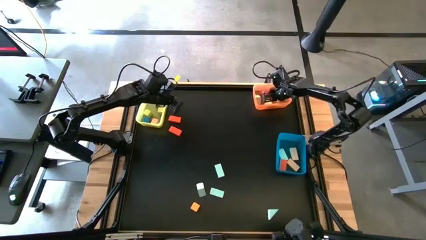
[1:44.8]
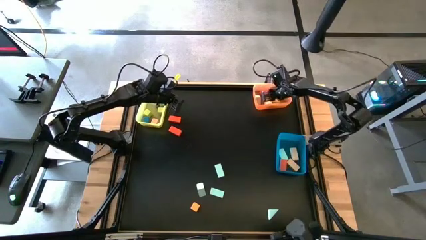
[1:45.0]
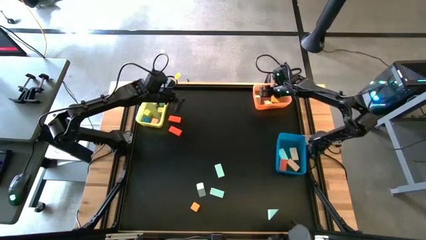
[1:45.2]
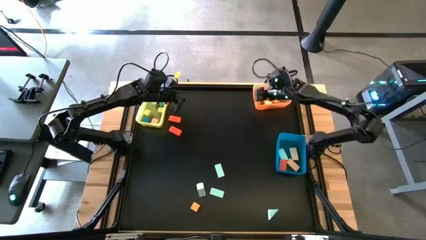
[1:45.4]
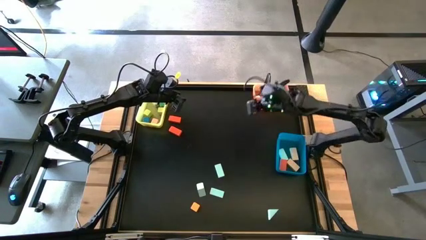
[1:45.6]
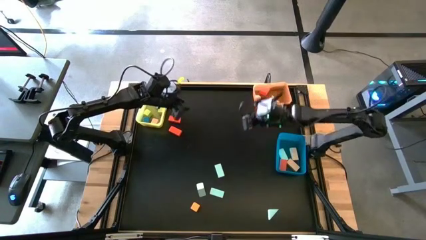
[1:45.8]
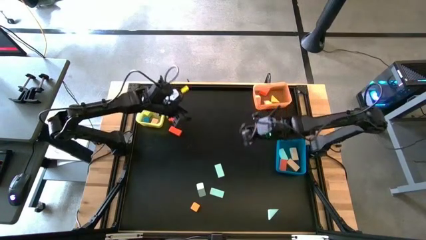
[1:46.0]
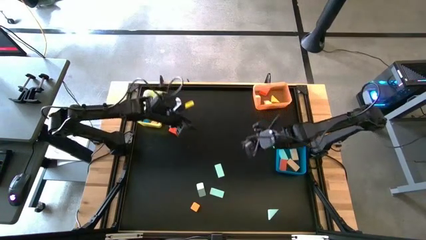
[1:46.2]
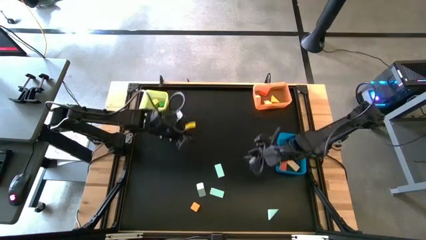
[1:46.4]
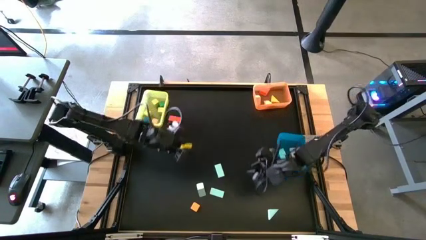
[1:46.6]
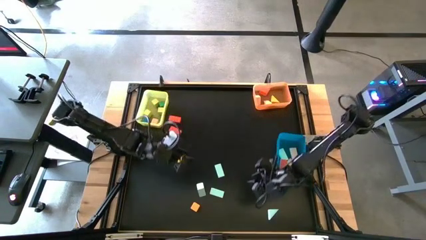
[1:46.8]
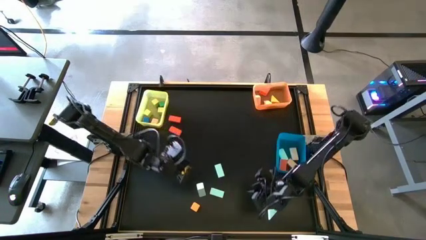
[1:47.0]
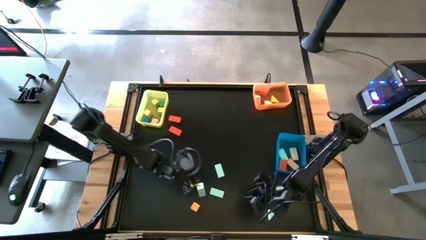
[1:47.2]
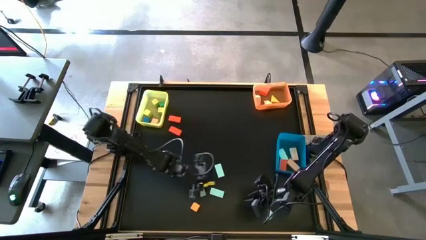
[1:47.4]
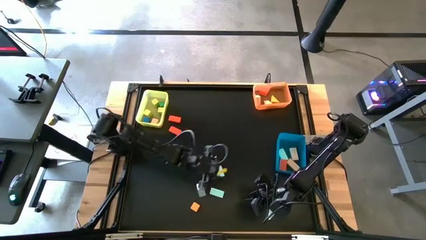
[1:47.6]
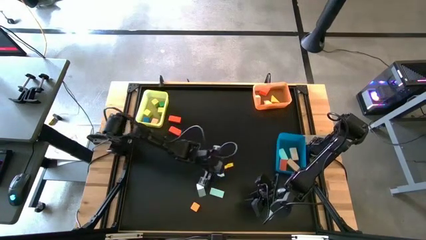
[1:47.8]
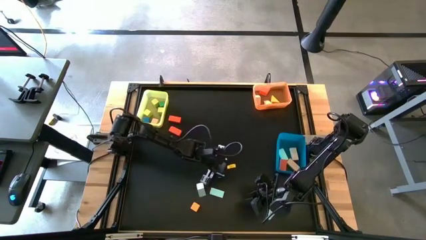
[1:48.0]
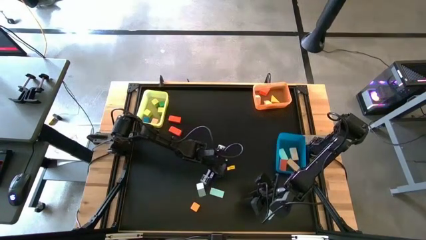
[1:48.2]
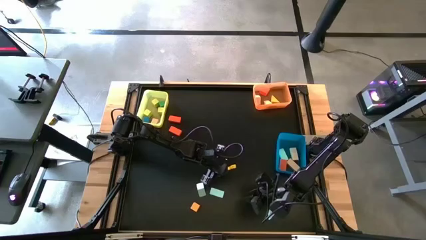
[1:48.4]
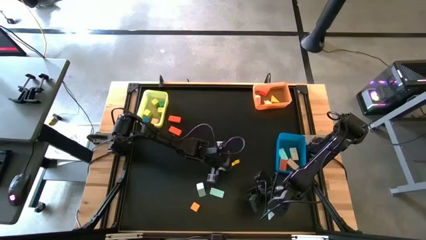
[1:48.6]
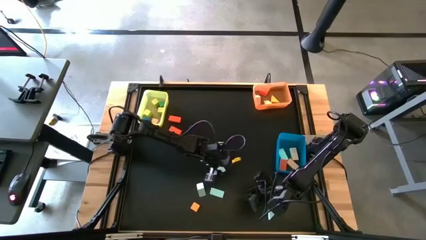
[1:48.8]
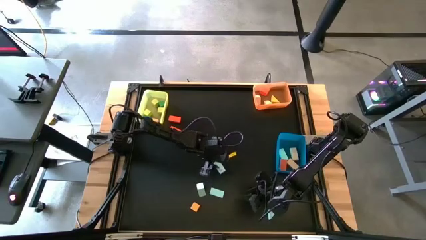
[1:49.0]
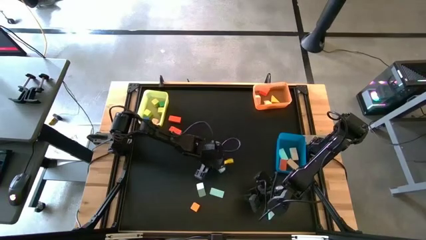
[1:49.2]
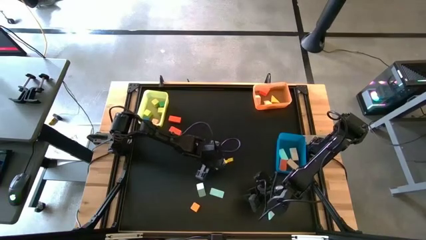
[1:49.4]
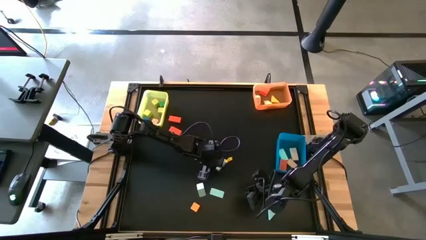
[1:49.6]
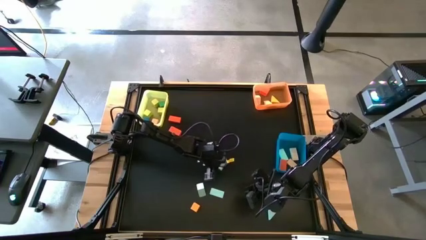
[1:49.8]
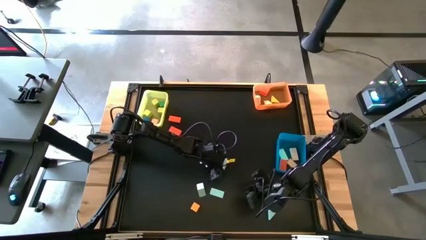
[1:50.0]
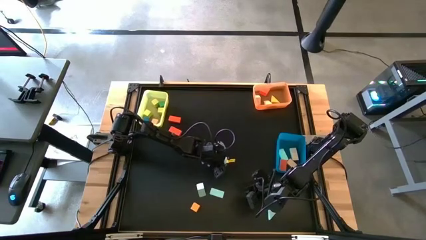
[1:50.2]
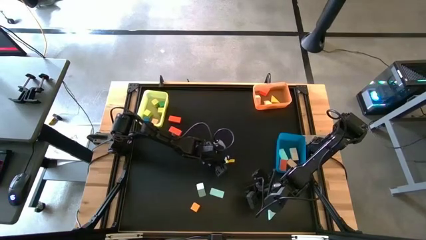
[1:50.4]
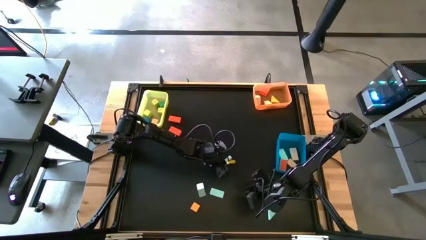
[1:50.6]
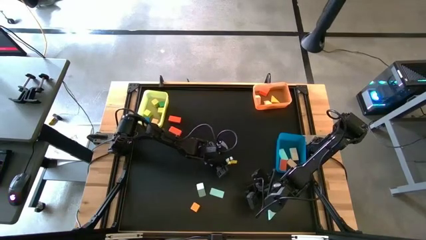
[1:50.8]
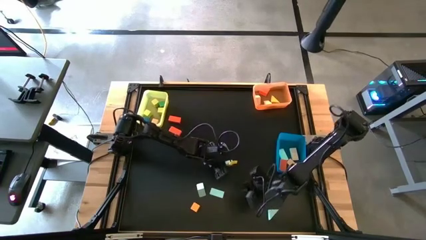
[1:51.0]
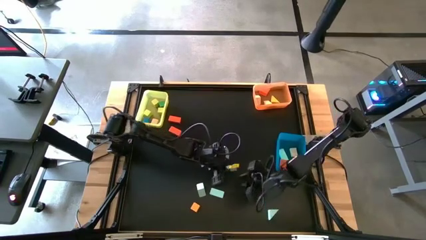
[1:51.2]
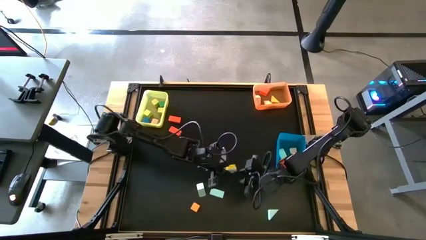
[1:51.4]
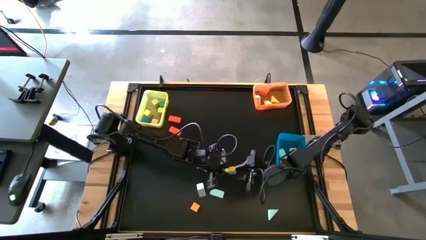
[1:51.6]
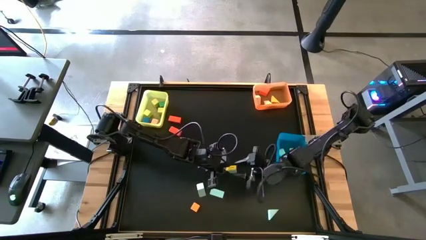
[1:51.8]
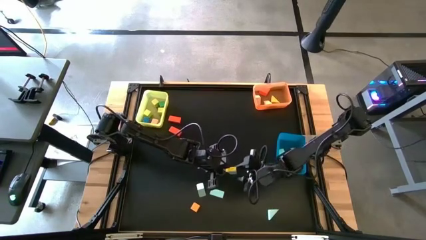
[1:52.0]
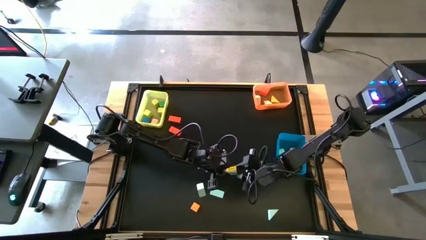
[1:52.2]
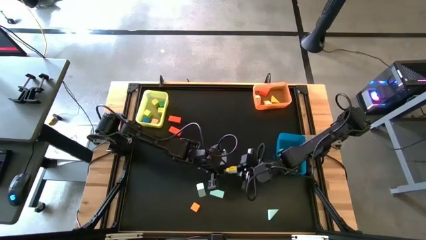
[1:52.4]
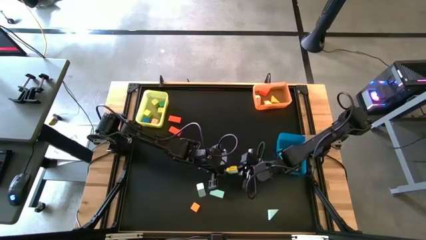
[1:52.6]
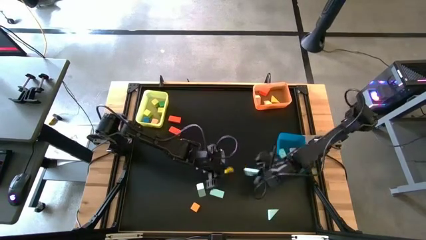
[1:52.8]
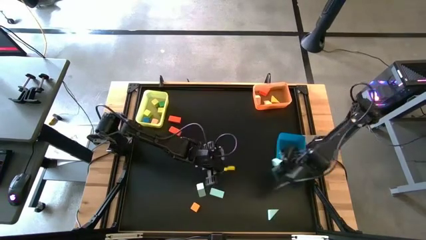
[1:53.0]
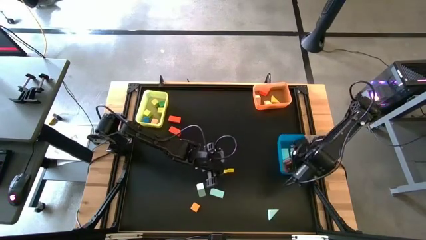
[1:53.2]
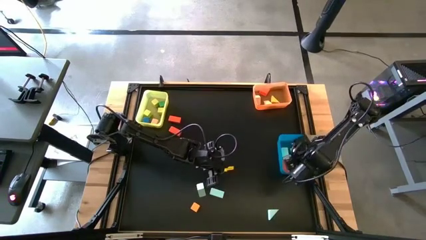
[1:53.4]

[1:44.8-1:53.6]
Task: Sort blocks by size
Put the blue rectangle block into the blue bin

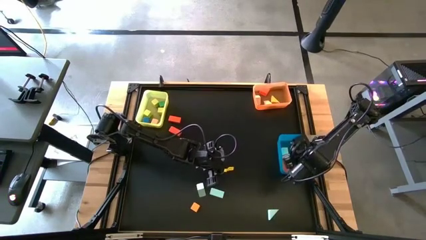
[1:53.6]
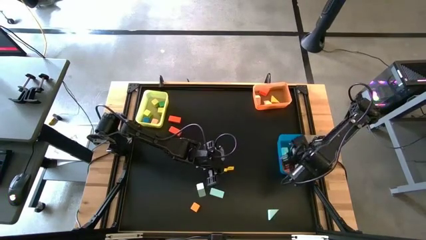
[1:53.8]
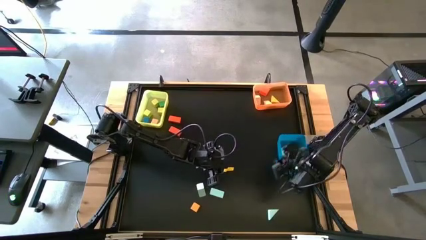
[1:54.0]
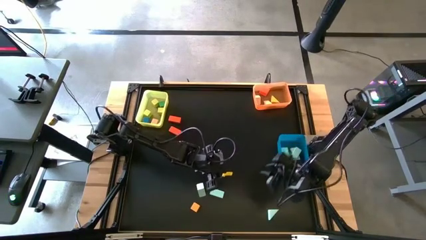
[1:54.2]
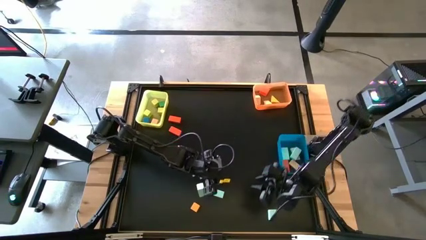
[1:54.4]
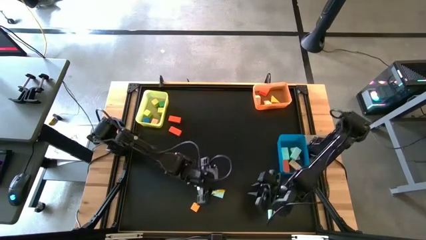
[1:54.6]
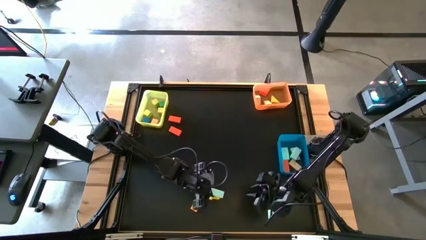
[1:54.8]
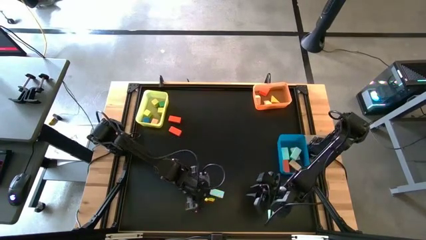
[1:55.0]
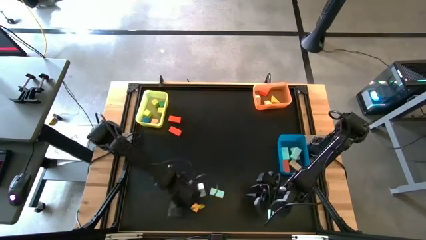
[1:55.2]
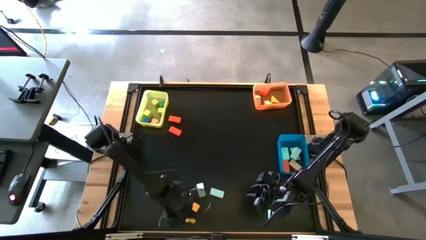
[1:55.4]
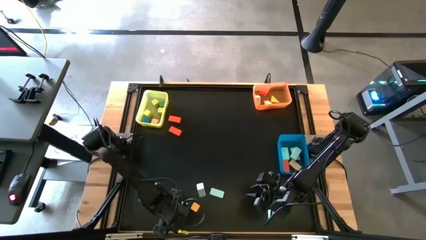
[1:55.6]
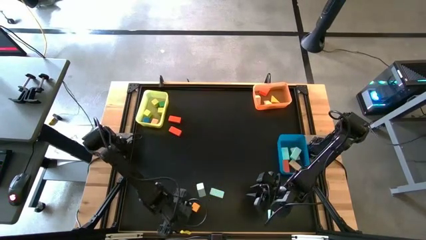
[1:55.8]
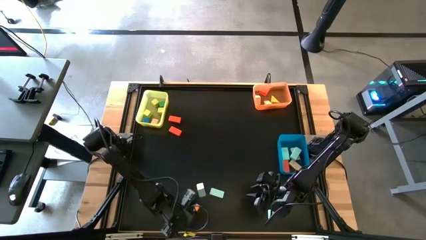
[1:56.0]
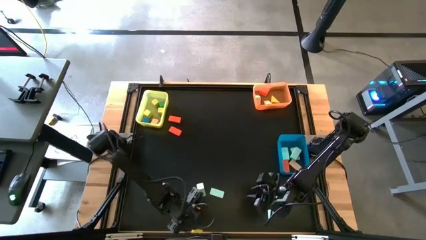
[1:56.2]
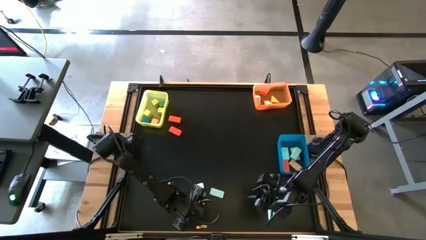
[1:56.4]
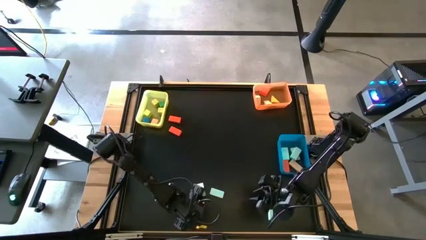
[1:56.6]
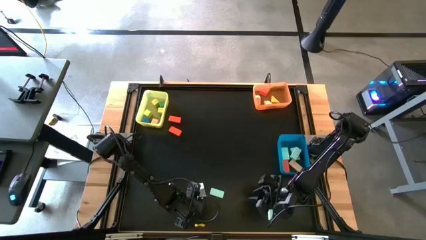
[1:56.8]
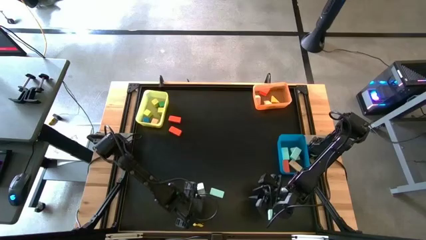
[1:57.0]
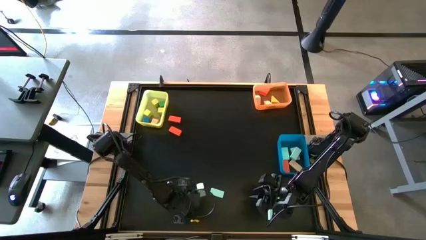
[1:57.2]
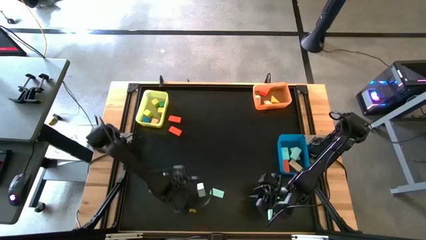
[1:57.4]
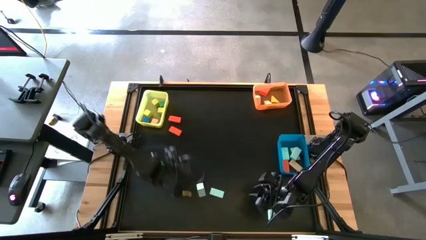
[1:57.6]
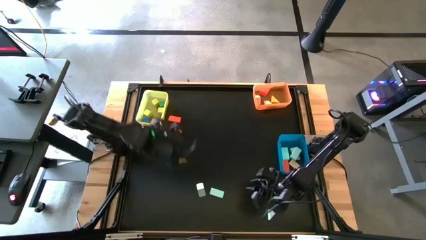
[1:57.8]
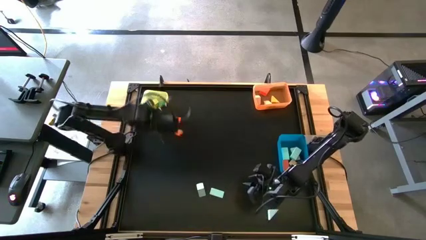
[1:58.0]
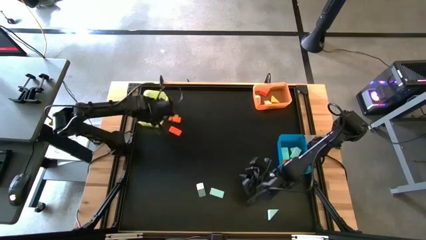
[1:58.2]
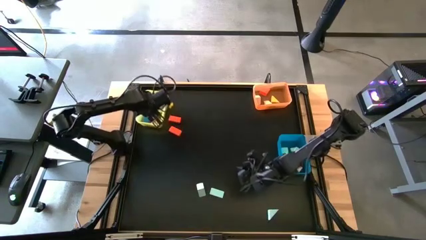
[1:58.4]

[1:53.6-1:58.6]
Put the yellow square block into the yellow bin

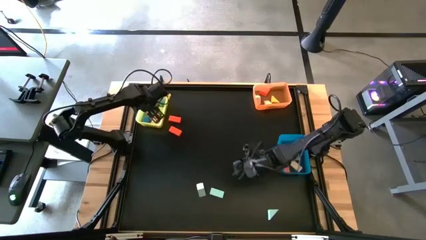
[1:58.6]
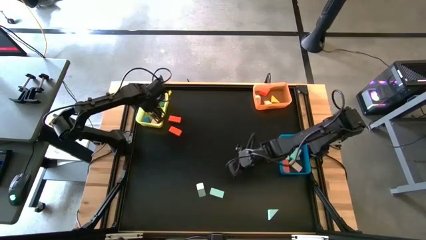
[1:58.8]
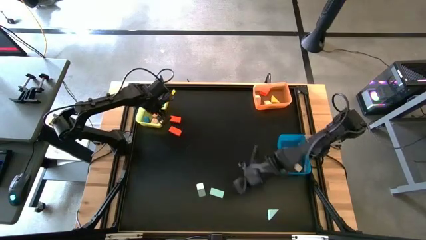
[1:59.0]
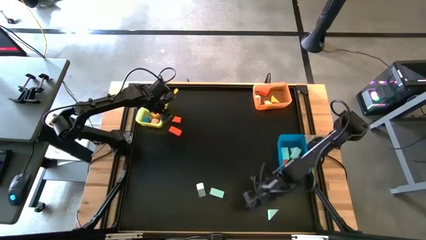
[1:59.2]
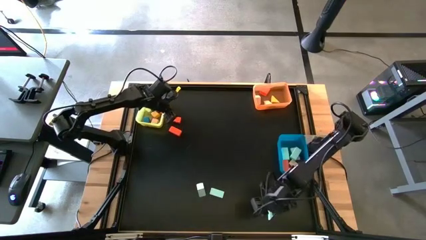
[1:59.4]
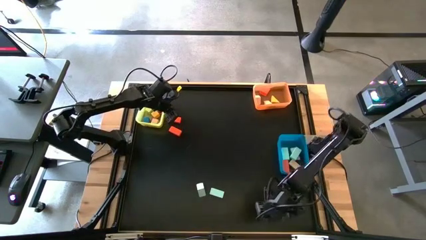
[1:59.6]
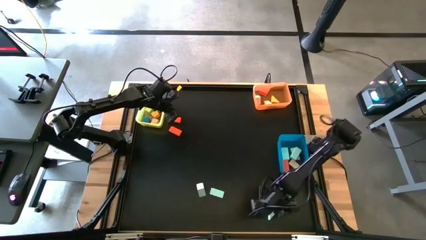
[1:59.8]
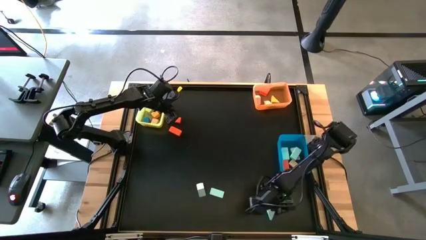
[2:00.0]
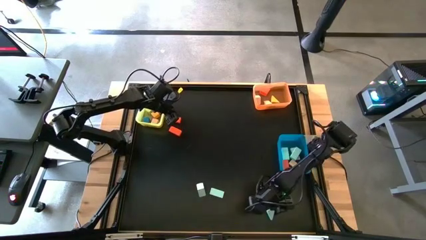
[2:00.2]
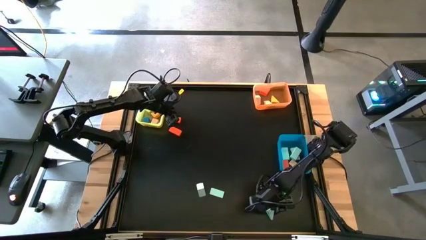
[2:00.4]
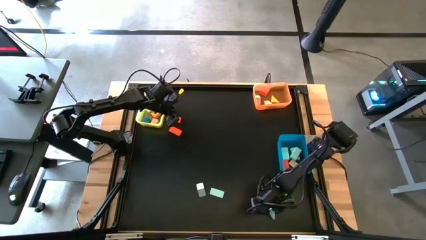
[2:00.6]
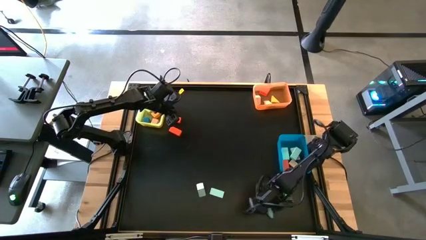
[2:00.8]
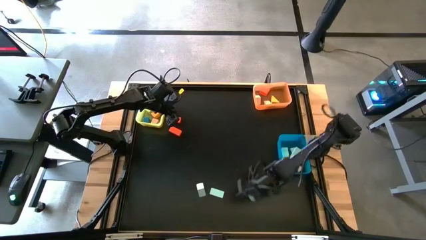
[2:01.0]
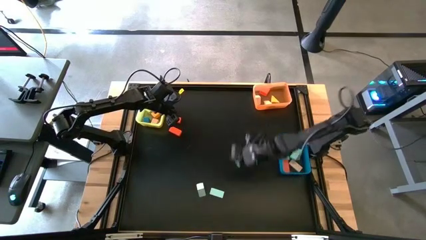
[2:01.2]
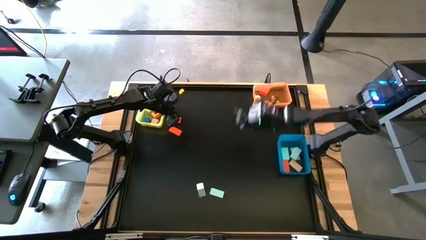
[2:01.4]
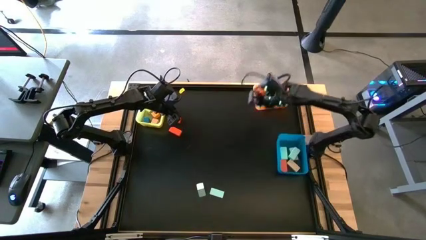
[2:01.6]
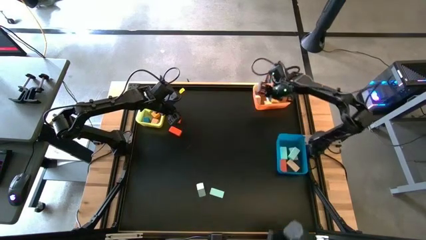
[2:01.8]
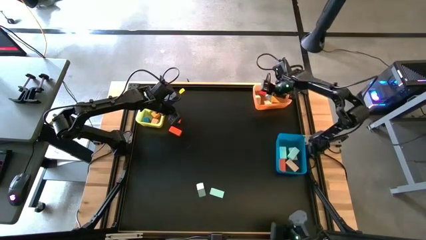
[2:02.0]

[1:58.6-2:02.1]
Put the blue triangle wooden block into the orange bin
